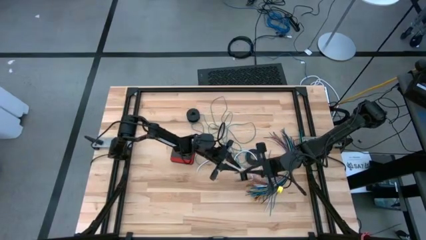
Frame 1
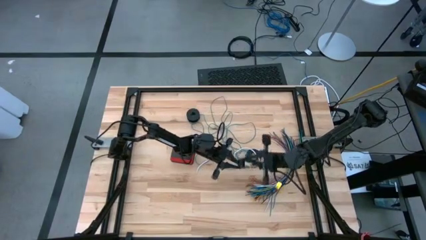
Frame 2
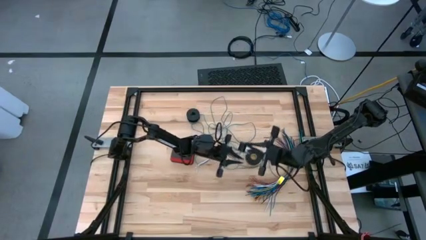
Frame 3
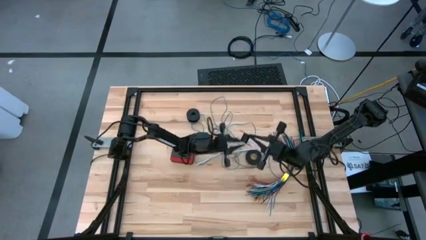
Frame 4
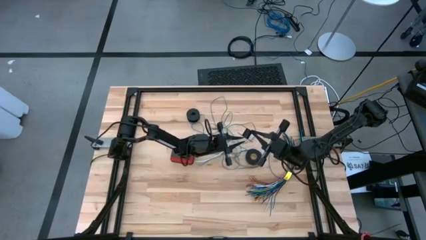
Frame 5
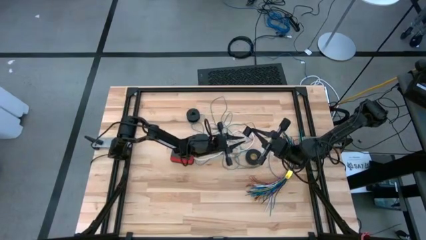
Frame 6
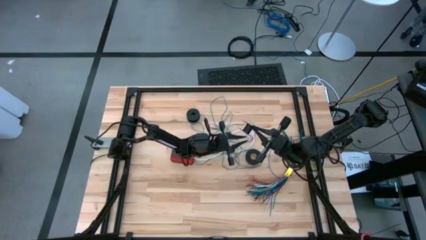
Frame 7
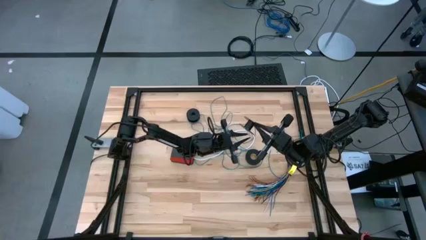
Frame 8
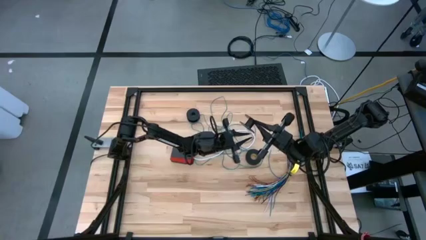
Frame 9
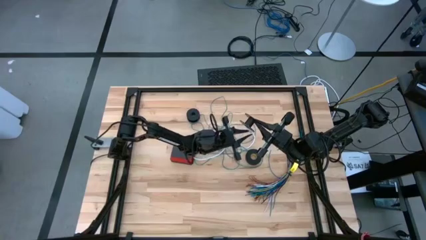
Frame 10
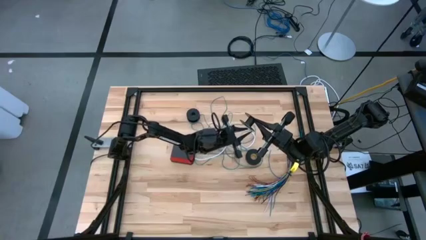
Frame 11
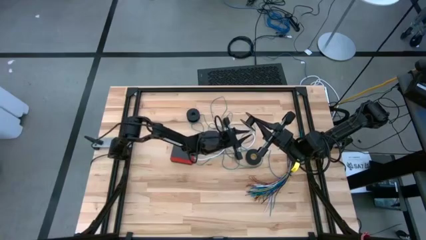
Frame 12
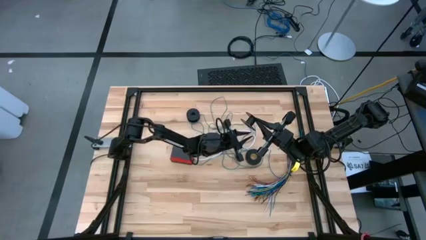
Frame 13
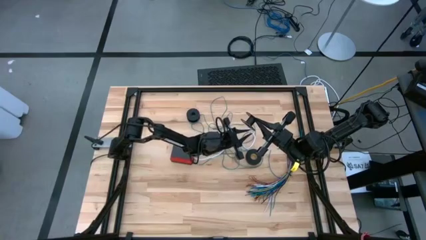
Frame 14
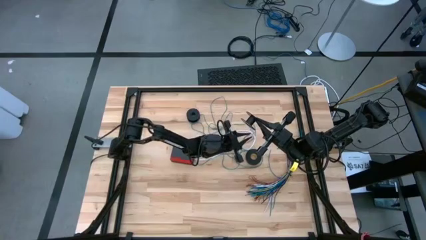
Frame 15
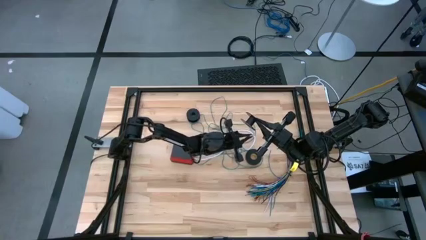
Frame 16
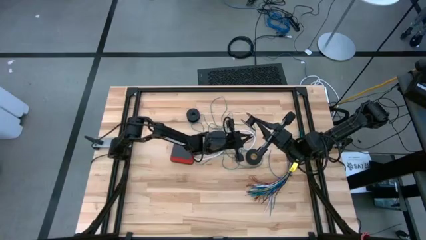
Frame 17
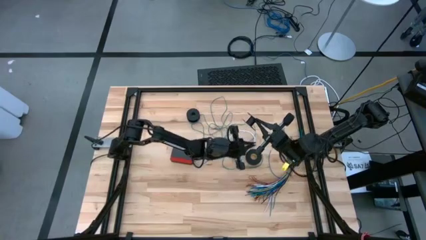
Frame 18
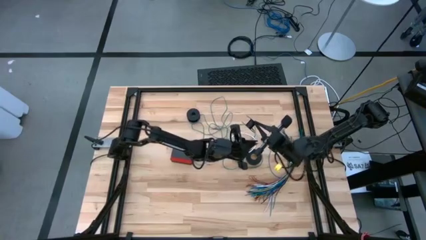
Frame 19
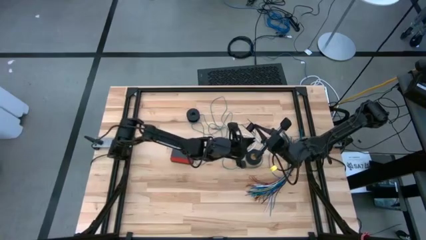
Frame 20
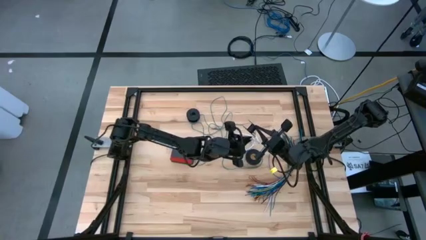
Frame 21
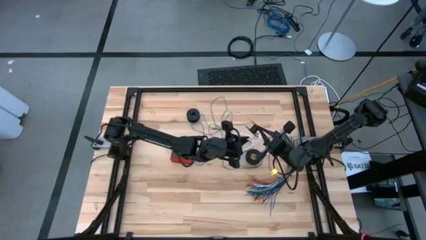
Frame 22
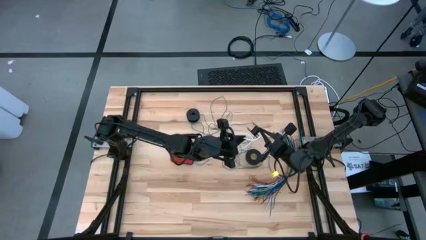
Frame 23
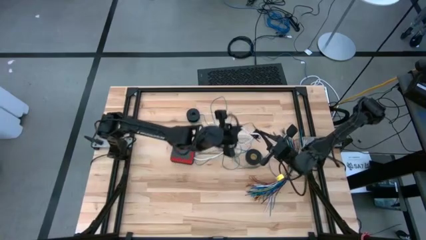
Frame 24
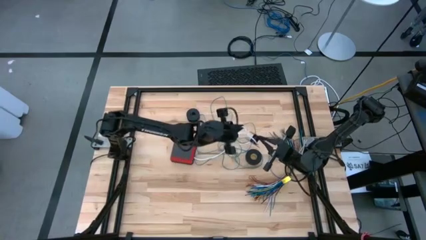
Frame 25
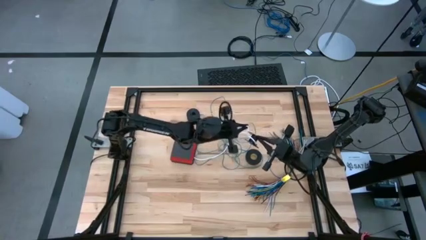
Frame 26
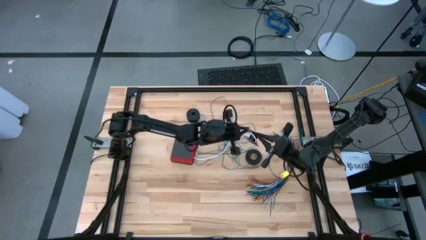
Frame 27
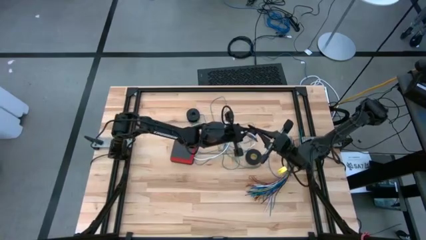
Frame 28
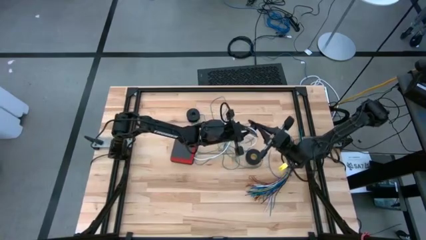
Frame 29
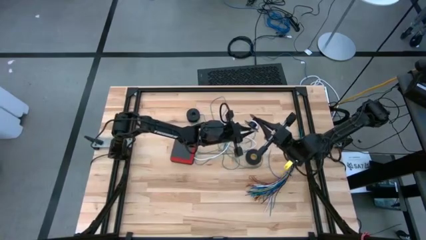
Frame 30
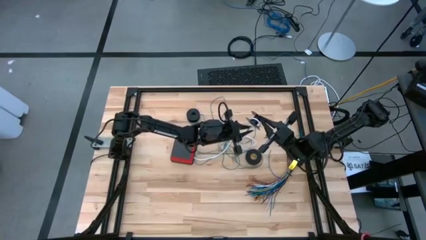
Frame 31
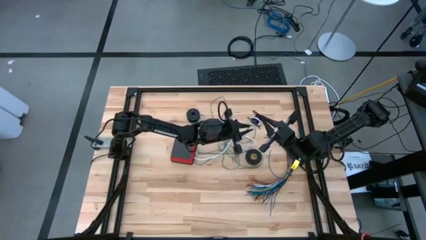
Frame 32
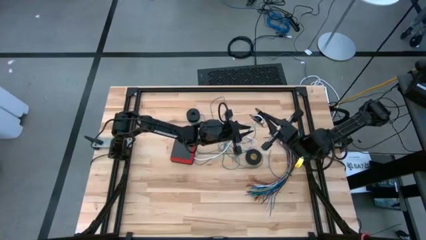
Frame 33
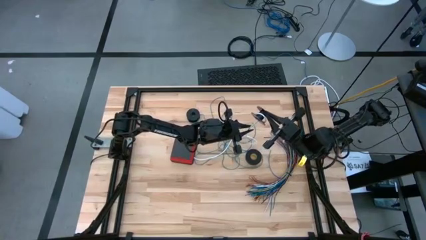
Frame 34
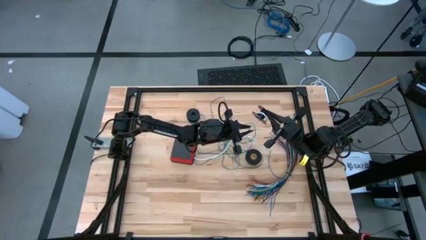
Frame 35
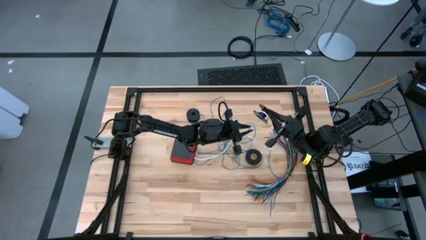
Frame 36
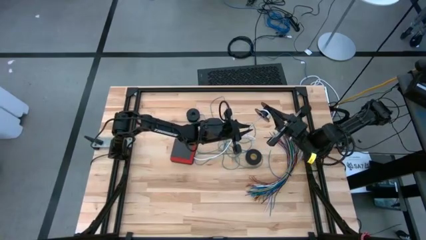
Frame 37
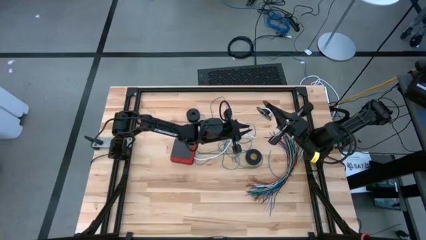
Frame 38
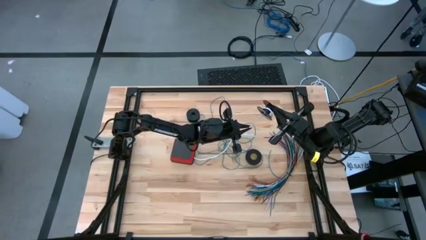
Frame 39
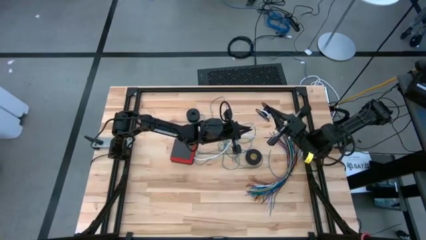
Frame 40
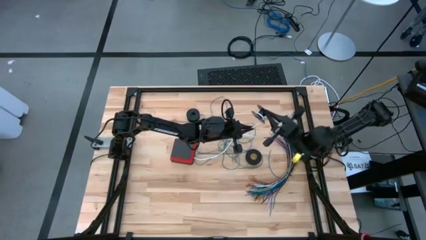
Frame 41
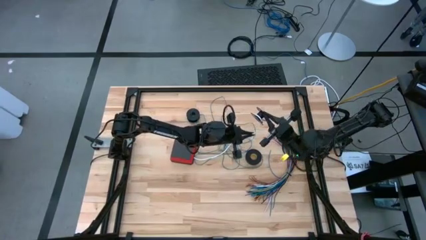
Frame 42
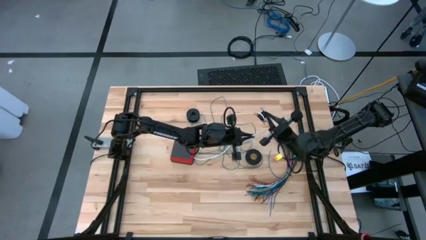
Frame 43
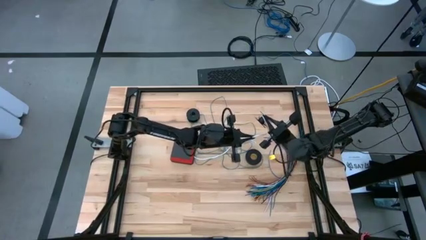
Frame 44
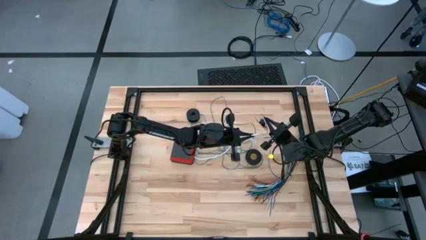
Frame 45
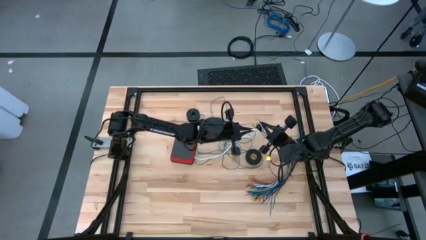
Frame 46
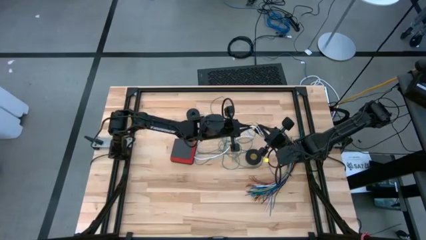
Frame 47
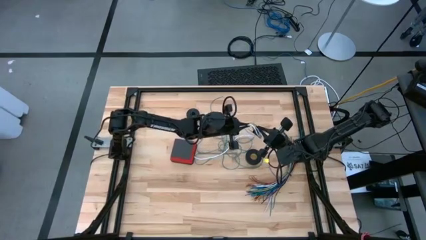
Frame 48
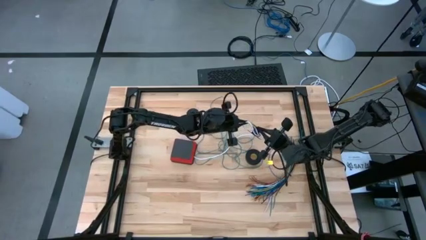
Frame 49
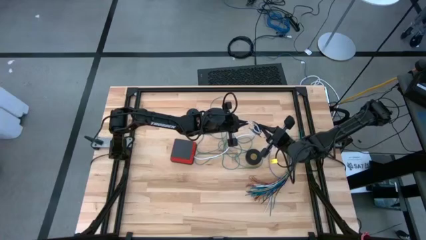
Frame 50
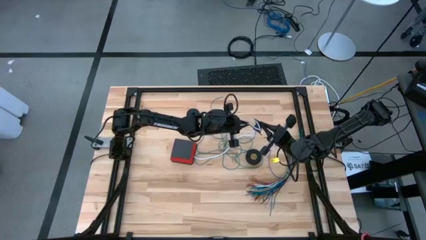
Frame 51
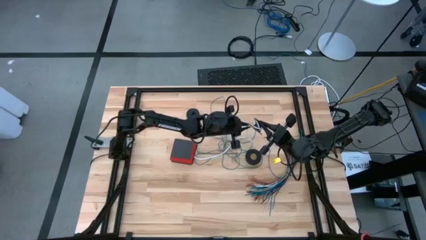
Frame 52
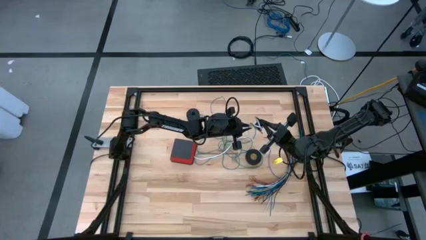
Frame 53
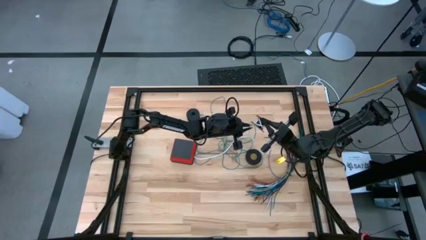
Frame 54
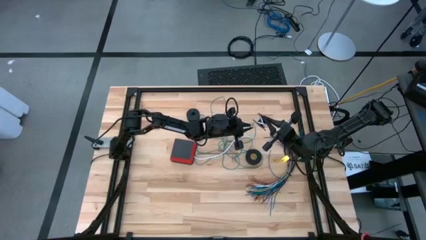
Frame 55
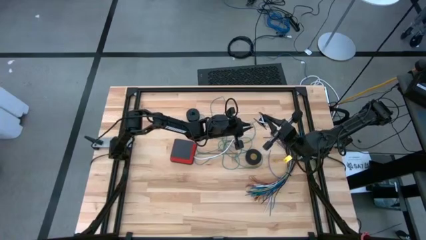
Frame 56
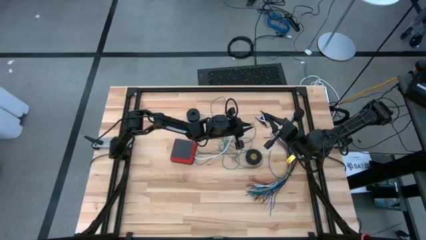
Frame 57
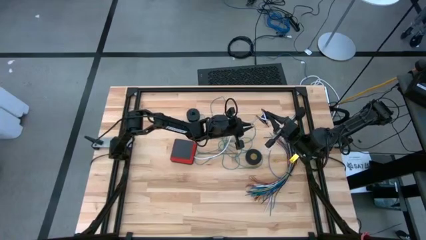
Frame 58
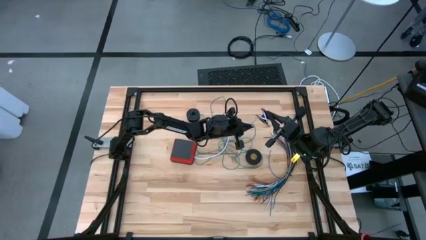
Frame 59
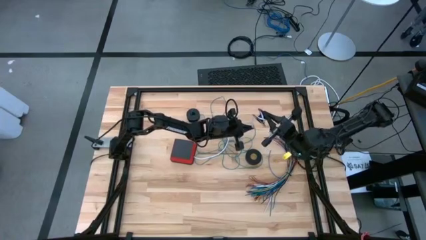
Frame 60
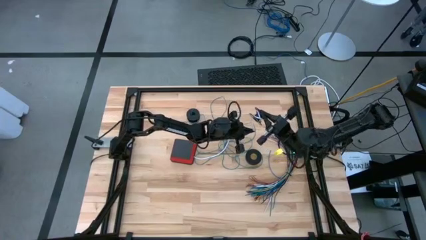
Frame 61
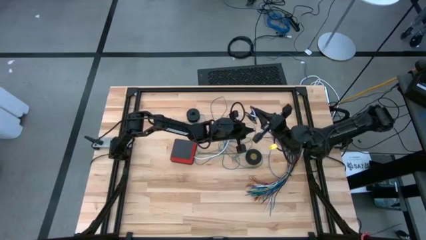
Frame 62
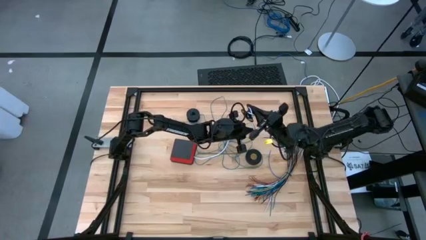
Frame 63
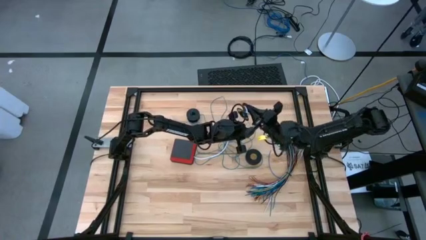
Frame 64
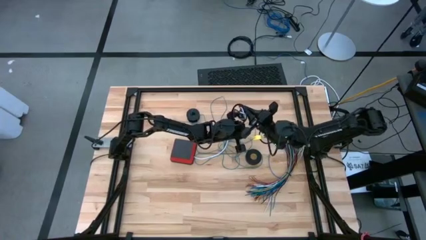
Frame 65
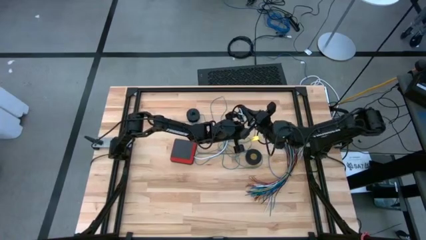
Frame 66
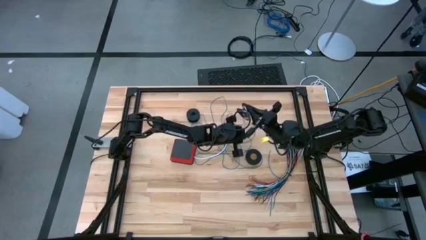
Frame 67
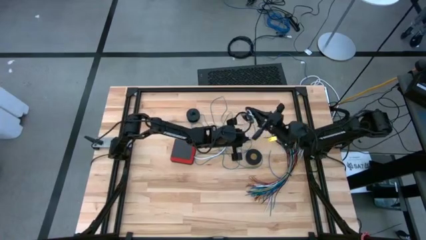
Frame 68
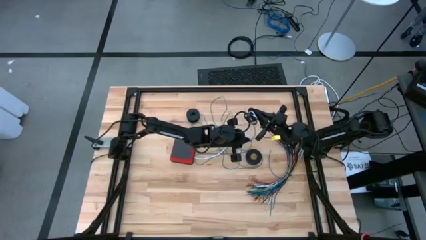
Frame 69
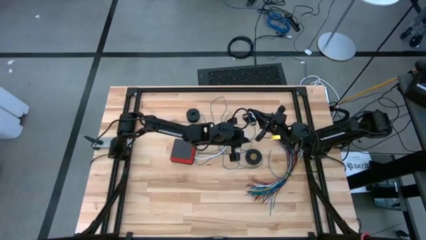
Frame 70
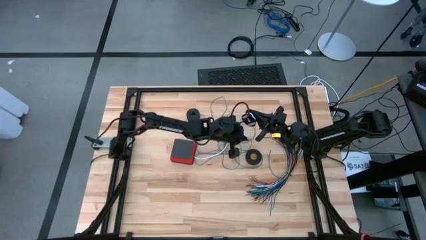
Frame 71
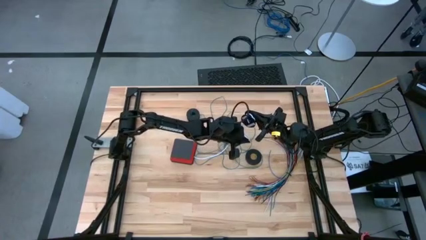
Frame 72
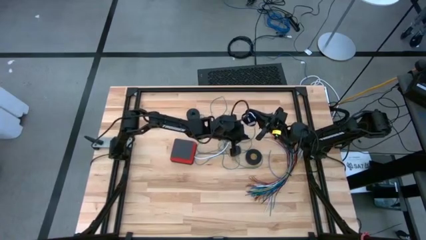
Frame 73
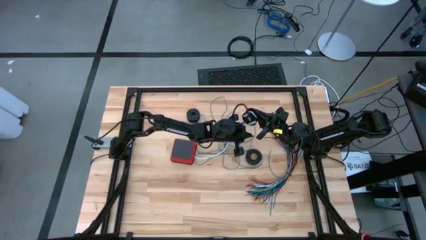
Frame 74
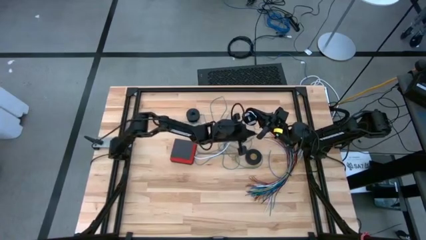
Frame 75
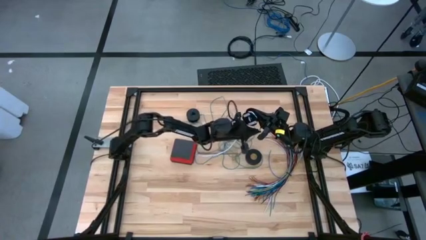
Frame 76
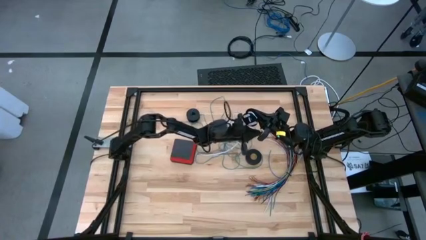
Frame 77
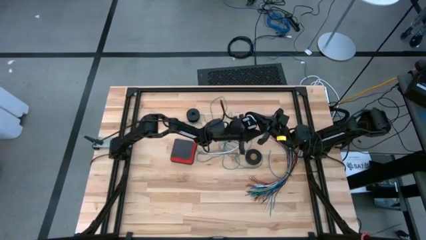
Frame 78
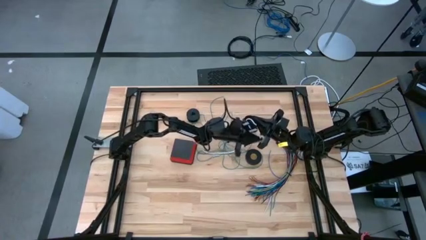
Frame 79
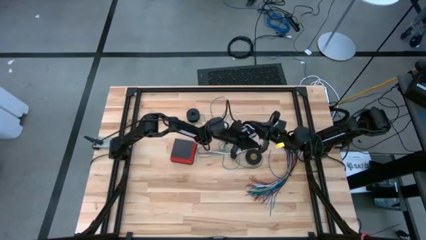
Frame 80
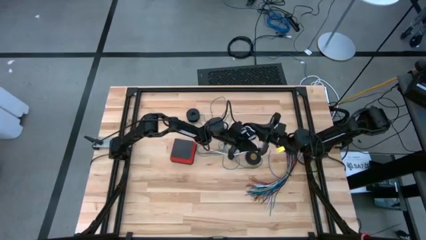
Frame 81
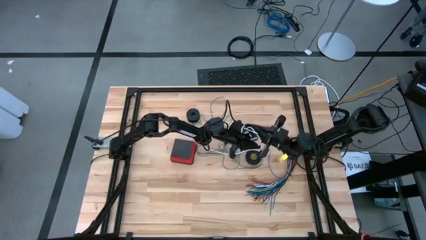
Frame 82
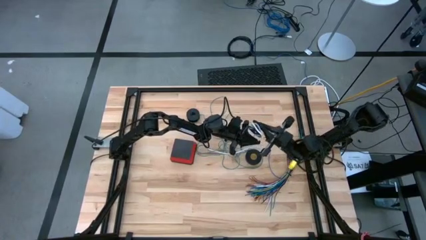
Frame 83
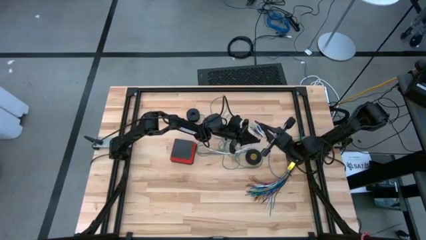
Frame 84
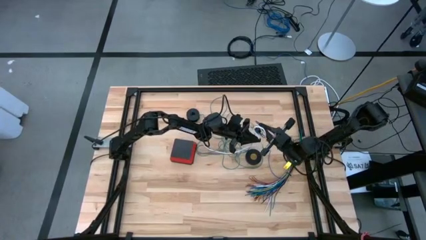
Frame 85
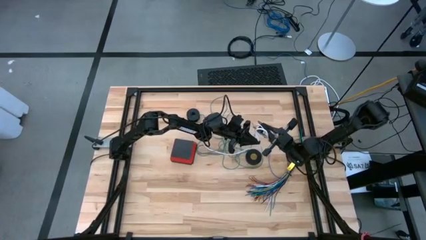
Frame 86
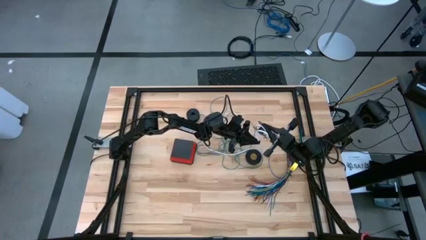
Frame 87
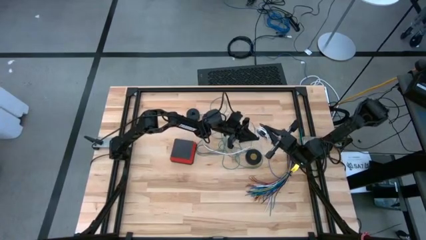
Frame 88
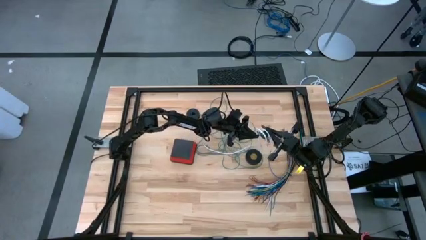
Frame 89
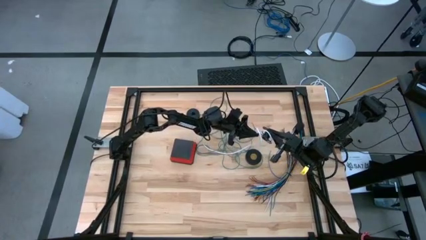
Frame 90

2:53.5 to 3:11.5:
Task: Coiling cords
Coil the white wire cable on the spool
